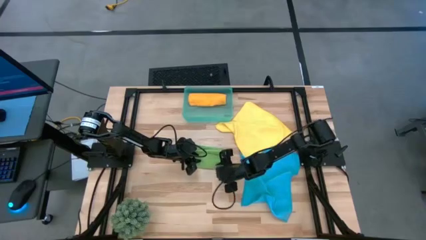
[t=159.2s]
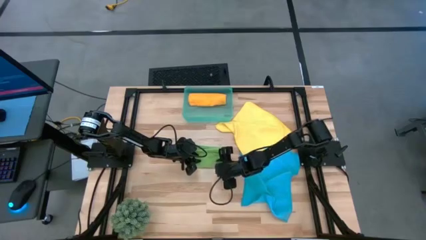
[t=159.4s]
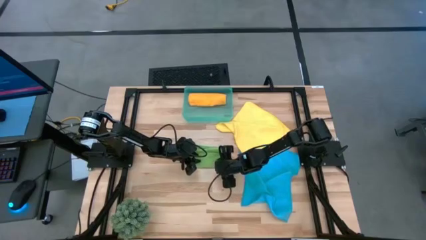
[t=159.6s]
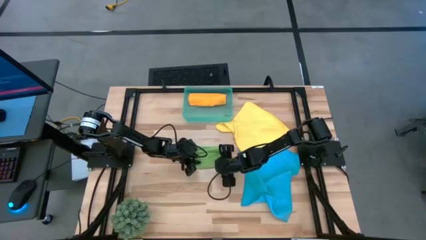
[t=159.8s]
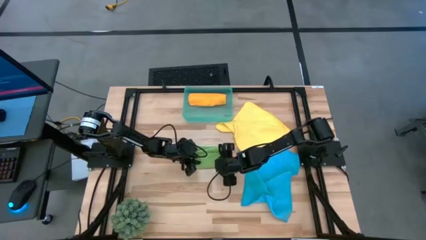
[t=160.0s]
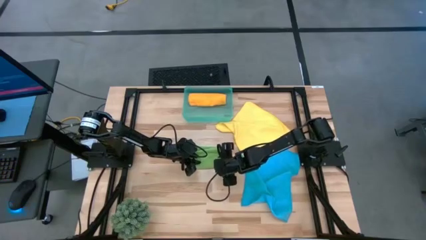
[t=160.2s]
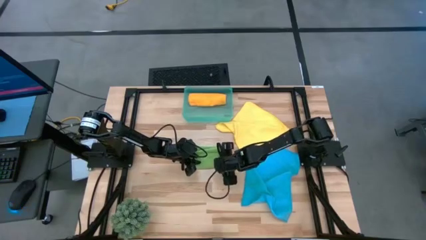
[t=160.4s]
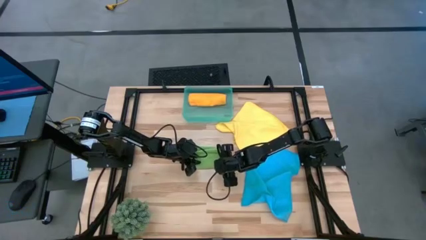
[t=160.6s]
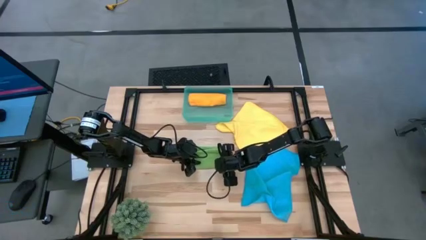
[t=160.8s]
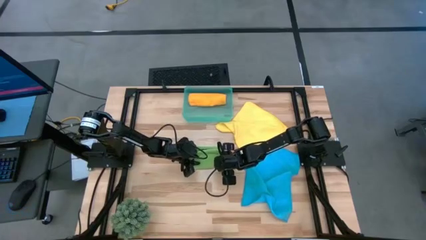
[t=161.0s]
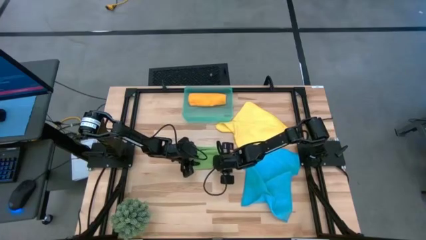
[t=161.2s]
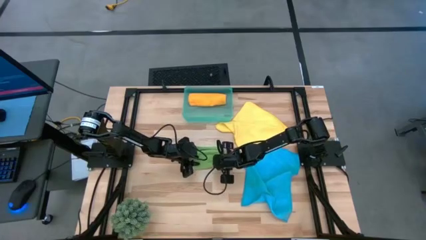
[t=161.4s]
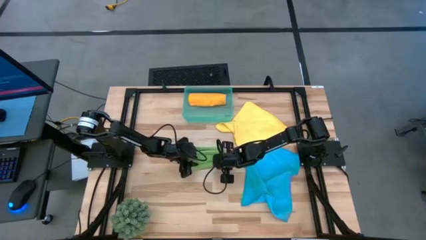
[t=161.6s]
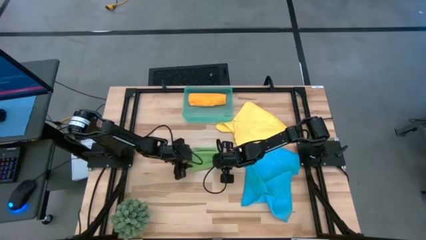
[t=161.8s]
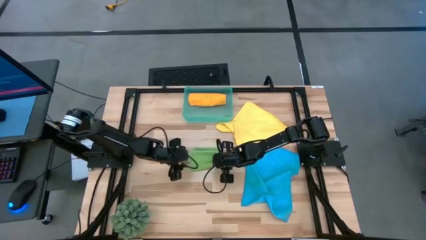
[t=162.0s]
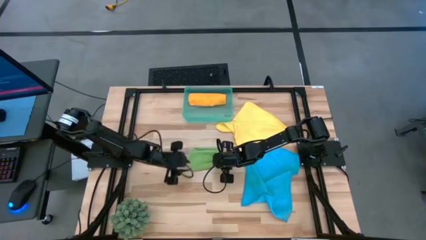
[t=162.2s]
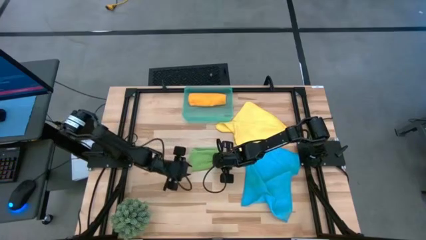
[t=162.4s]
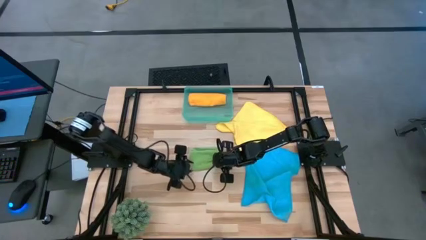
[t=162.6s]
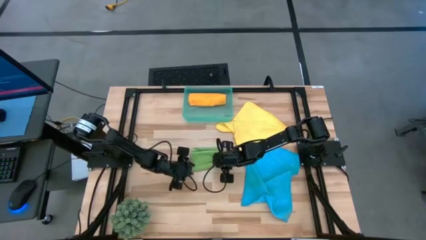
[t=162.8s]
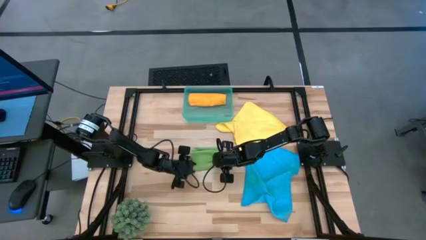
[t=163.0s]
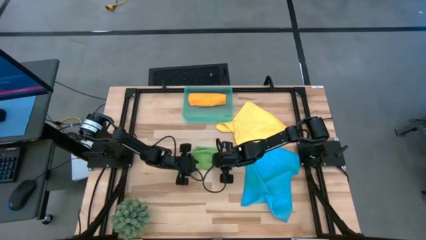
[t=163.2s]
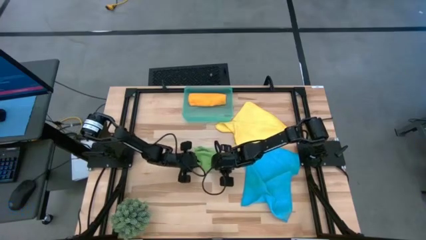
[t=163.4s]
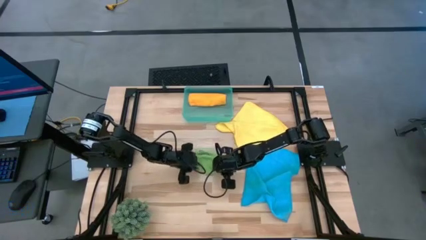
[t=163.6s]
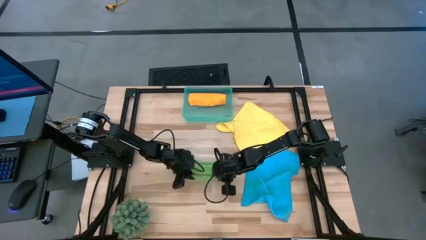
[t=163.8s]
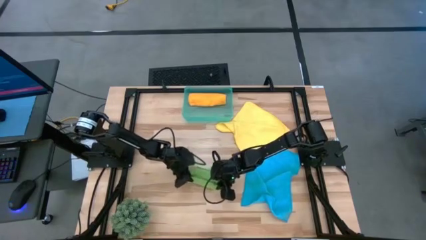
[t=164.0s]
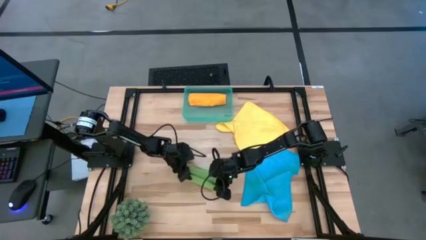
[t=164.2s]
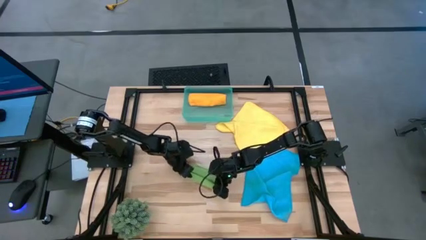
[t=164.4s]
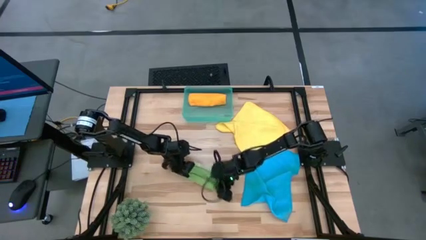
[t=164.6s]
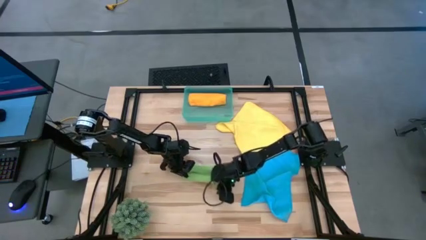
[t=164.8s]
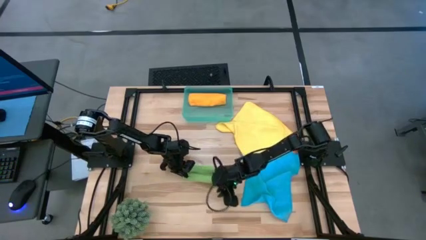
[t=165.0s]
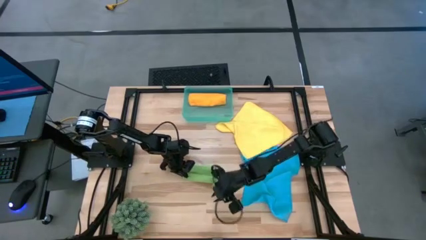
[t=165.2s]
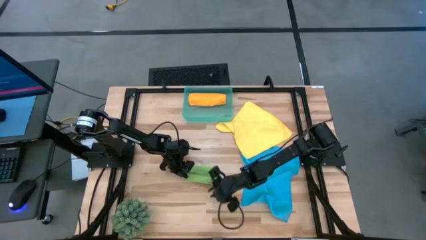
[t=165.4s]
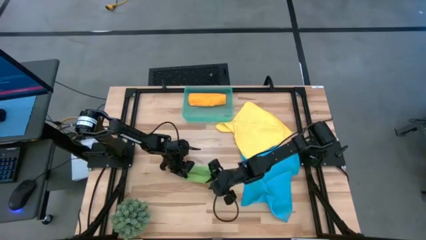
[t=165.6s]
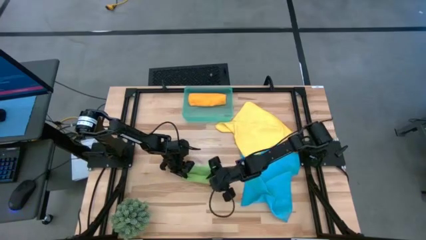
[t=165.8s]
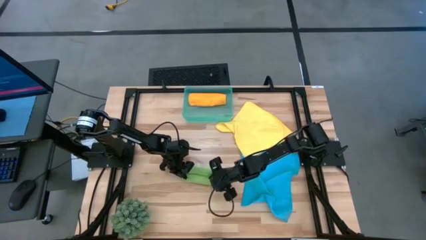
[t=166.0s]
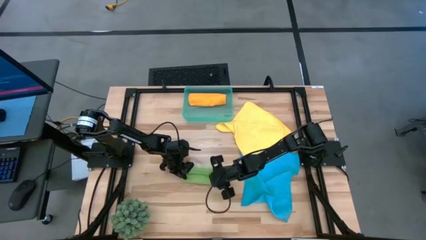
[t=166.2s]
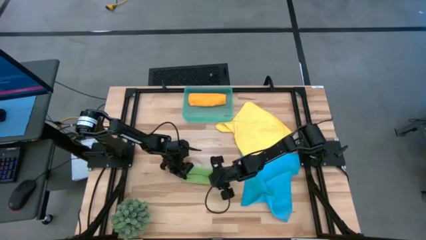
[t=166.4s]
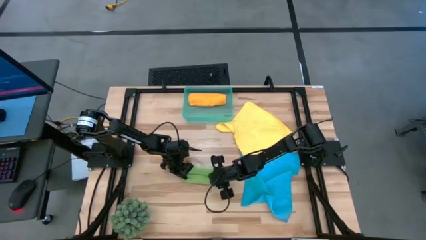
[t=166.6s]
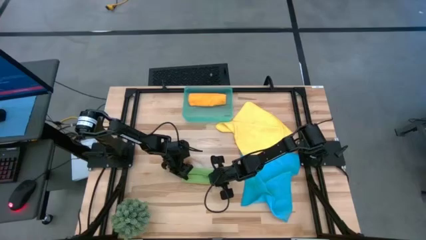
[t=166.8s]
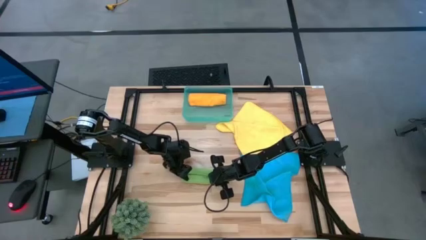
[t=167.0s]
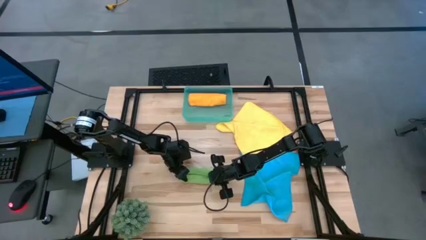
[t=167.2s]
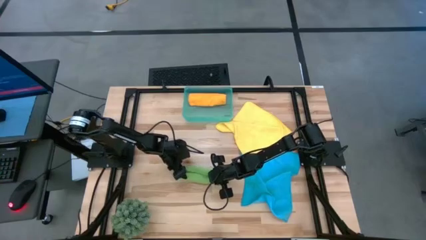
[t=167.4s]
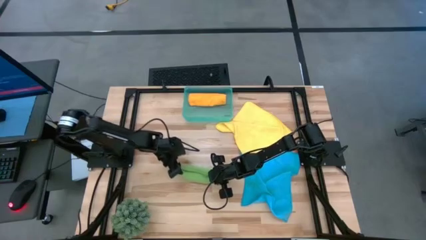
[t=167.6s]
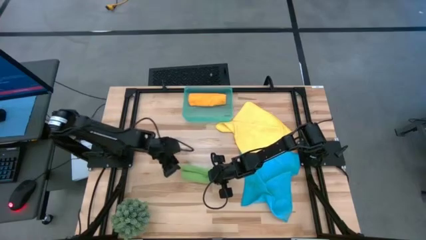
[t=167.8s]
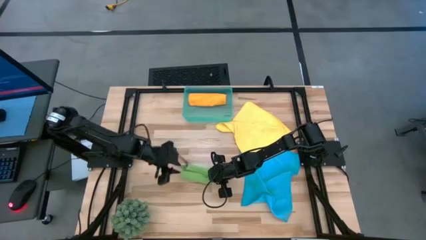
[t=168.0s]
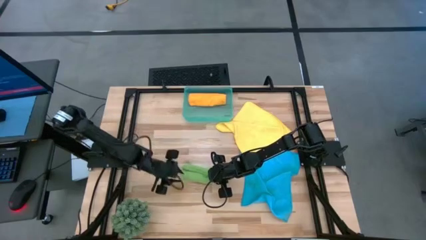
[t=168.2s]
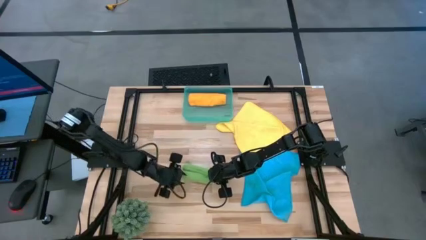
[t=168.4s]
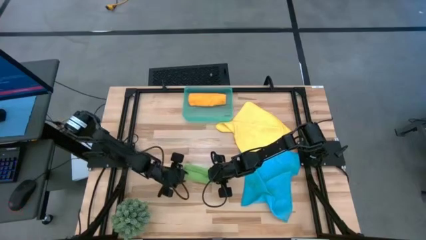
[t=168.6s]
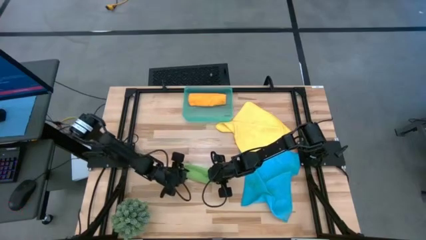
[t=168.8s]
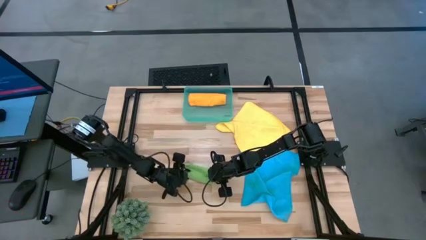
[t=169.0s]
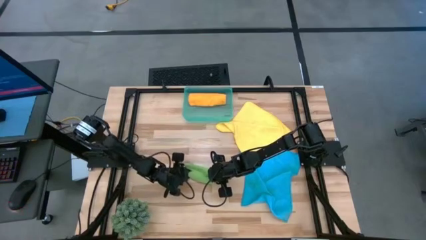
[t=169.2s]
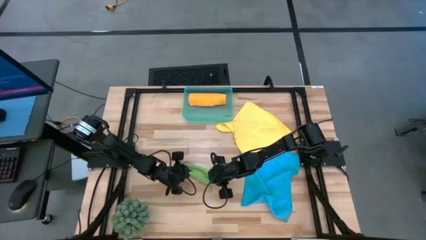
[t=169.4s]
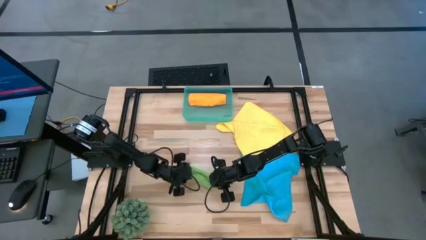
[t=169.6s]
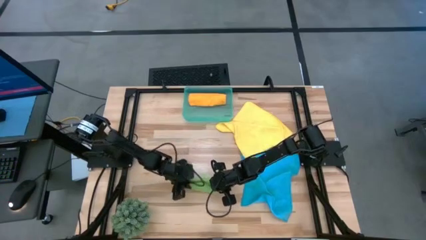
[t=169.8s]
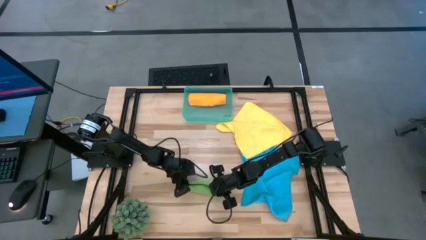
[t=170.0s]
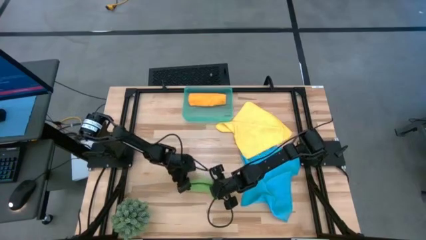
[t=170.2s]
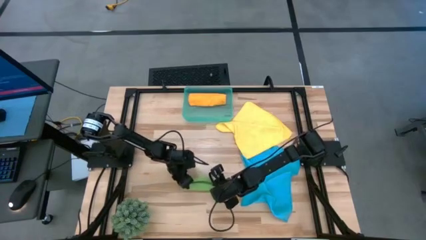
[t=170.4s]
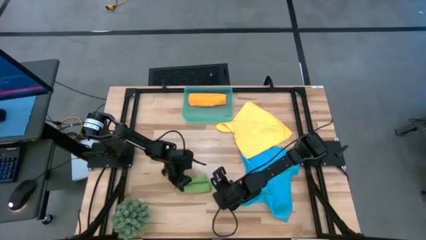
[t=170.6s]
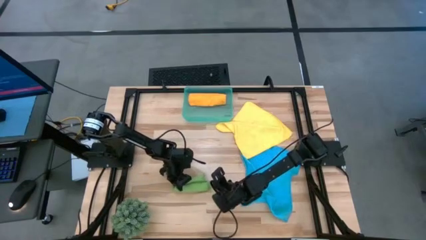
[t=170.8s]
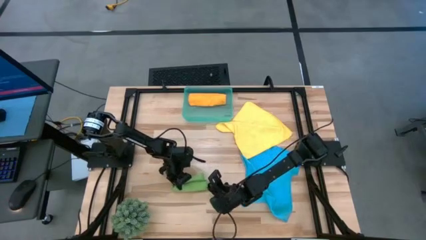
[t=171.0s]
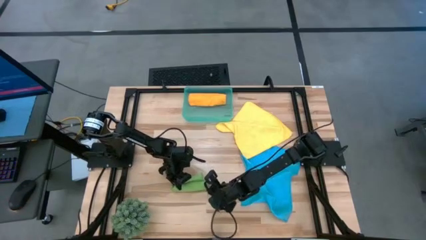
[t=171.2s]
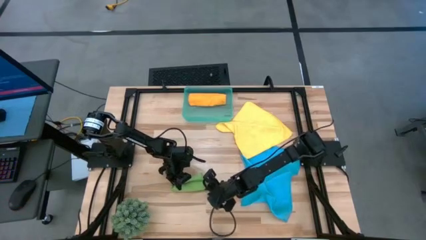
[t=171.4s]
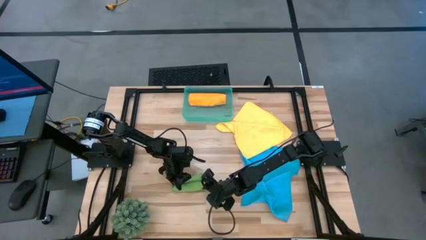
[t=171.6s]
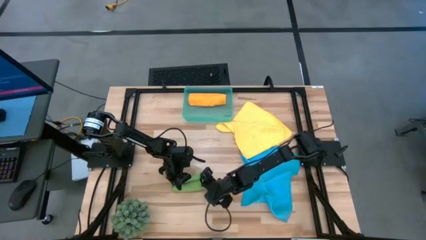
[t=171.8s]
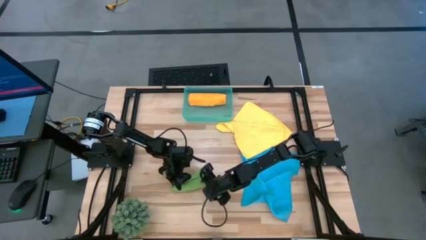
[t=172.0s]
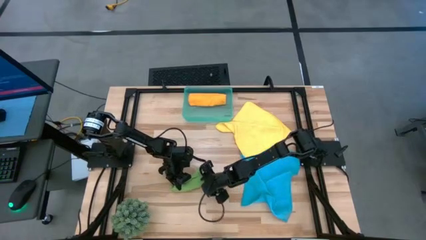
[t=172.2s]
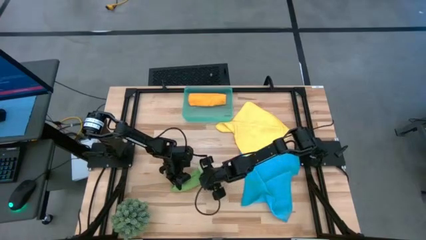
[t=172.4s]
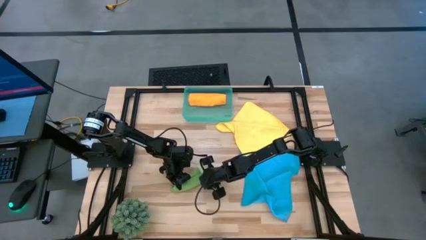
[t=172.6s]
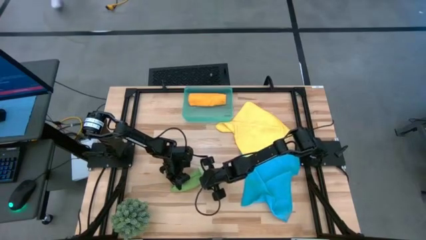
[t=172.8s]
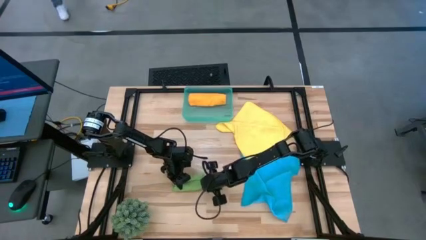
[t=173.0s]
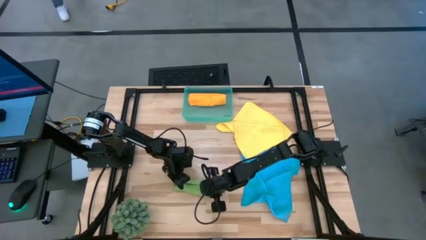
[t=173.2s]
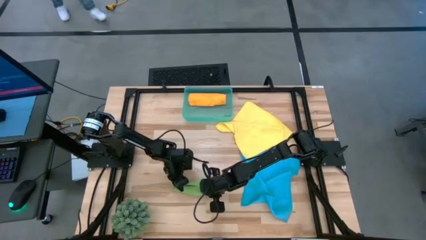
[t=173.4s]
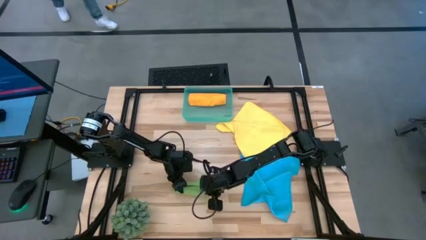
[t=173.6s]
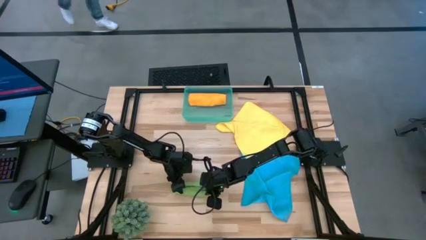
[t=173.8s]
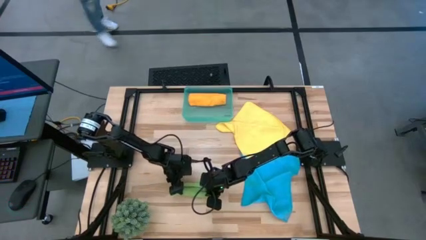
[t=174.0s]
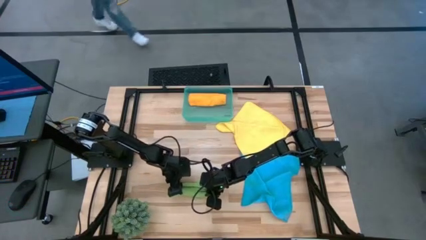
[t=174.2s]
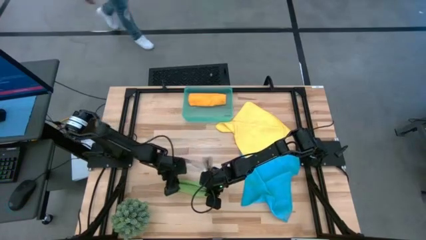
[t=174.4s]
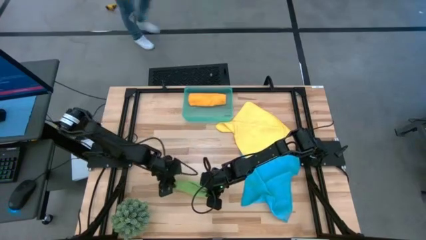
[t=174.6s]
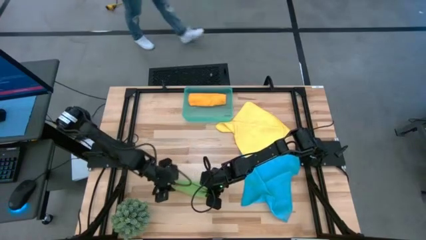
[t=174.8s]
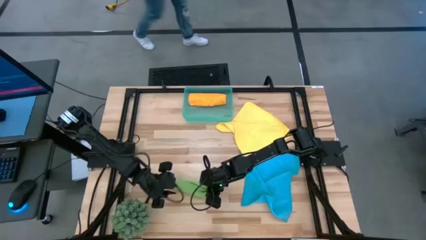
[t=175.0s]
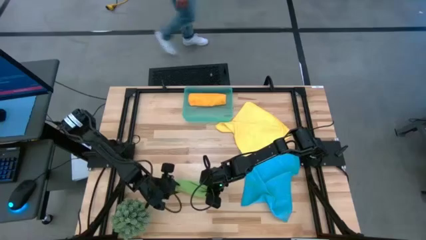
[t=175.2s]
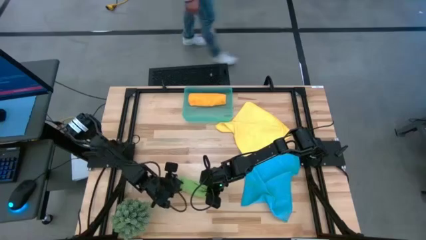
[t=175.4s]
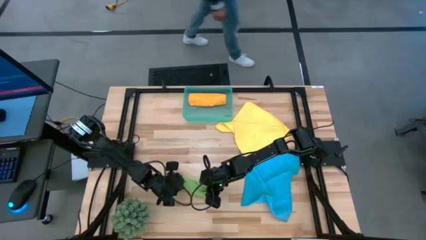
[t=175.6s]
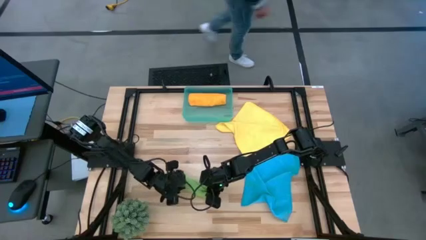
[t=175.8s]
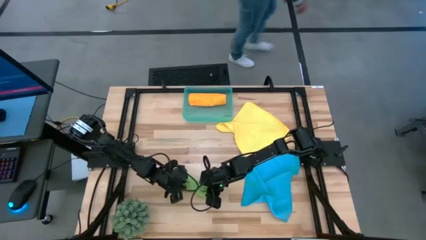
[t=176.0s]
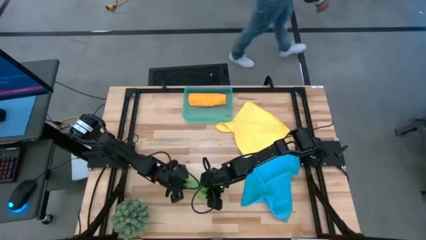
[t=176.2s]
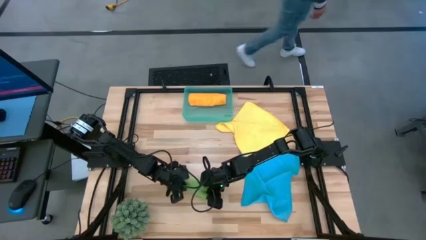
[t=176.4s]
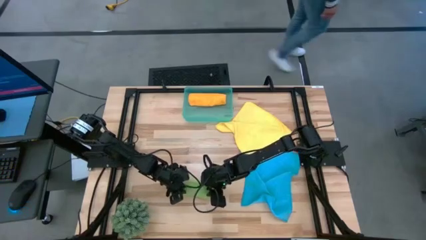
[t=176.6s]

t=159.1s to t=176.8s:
Task: Roll microfiber towels into tight, uniform cylinder then place into a basket
Fold the green towel
